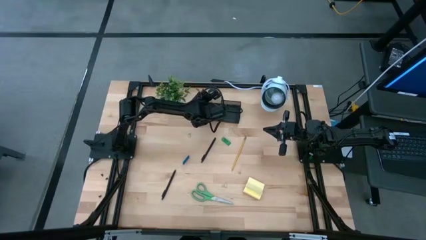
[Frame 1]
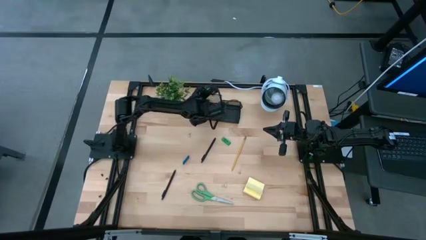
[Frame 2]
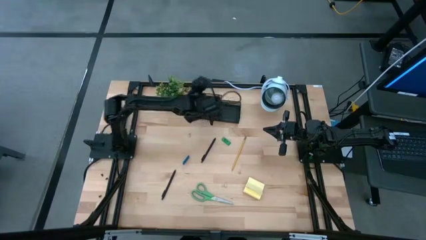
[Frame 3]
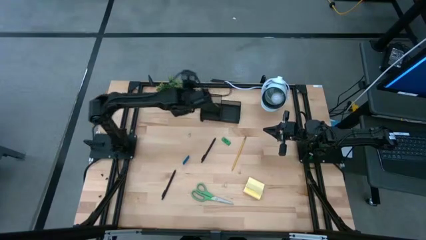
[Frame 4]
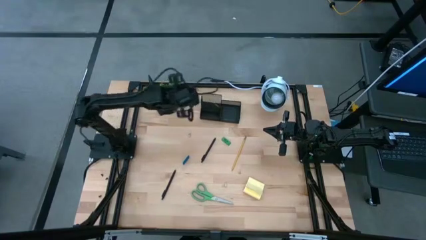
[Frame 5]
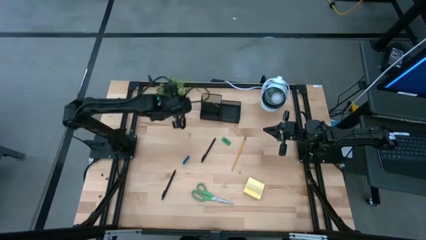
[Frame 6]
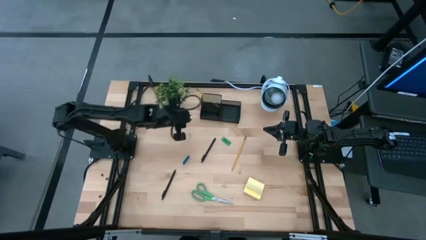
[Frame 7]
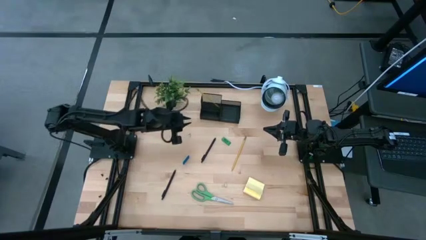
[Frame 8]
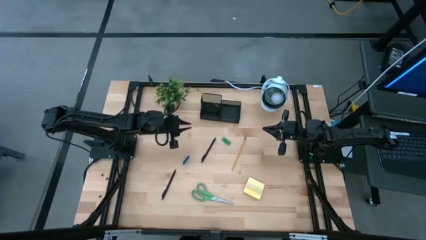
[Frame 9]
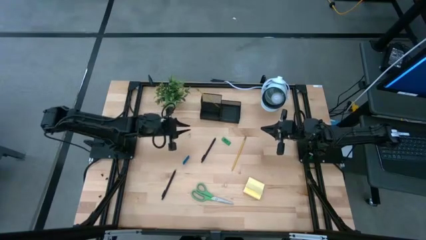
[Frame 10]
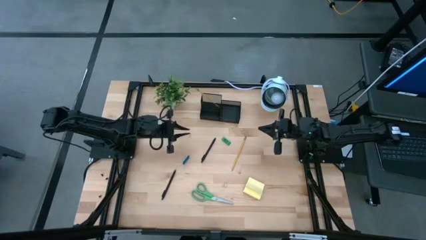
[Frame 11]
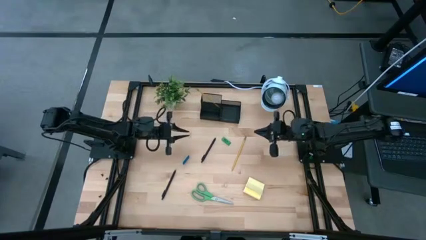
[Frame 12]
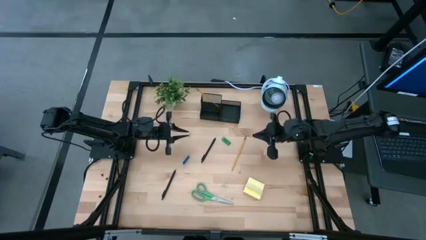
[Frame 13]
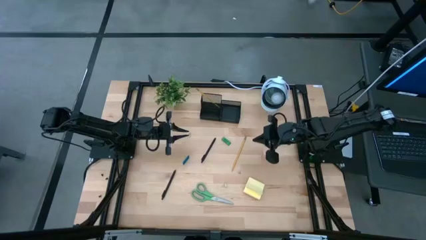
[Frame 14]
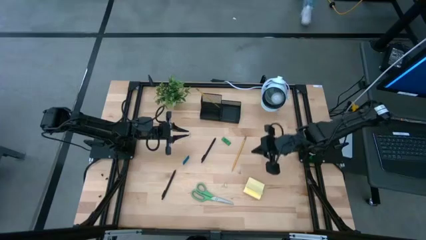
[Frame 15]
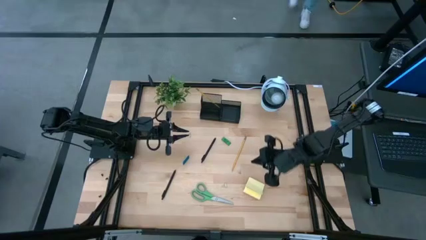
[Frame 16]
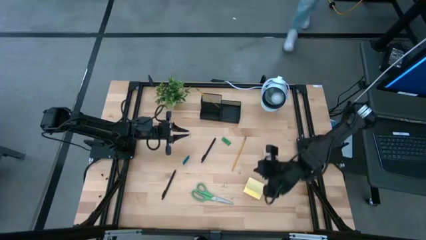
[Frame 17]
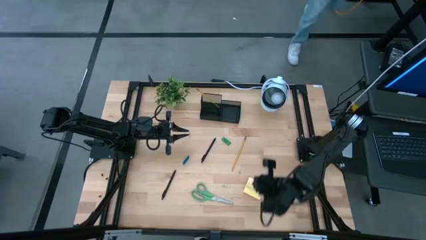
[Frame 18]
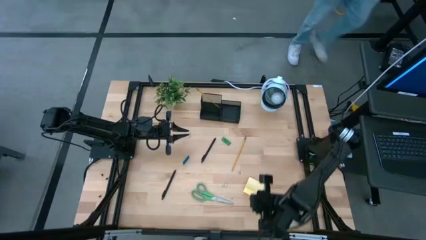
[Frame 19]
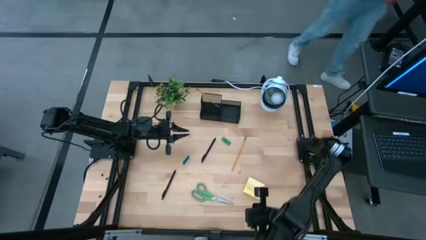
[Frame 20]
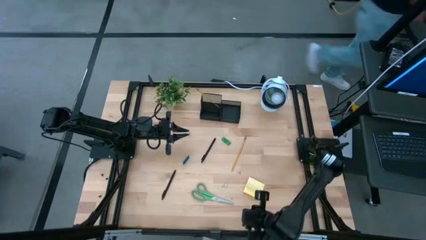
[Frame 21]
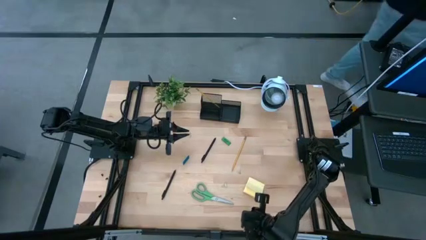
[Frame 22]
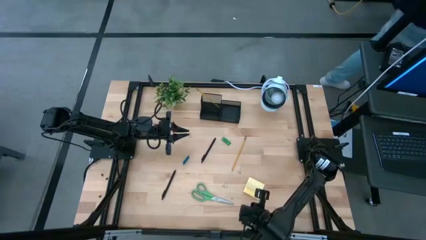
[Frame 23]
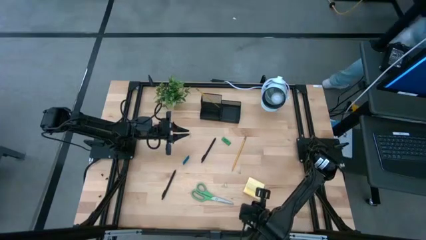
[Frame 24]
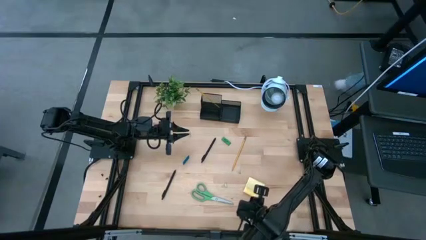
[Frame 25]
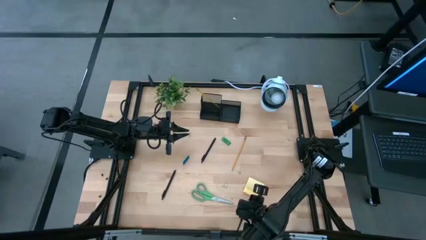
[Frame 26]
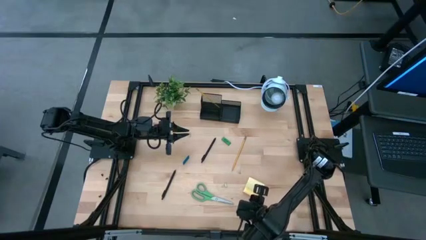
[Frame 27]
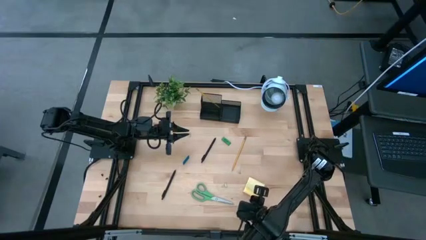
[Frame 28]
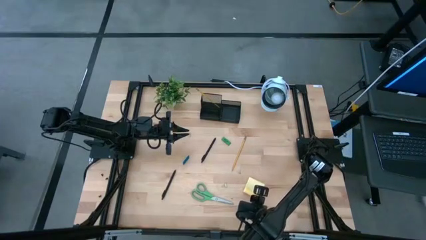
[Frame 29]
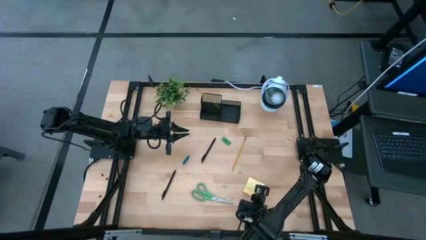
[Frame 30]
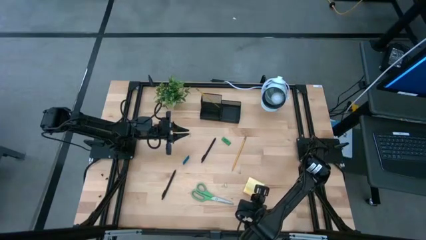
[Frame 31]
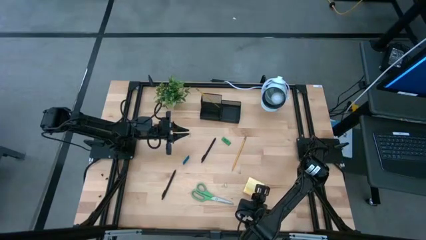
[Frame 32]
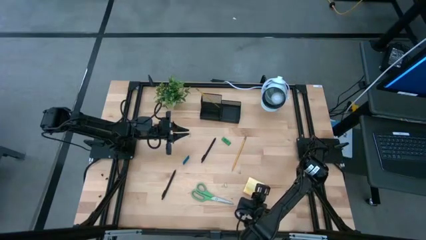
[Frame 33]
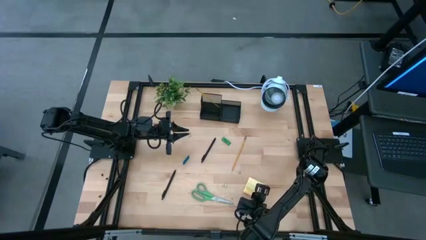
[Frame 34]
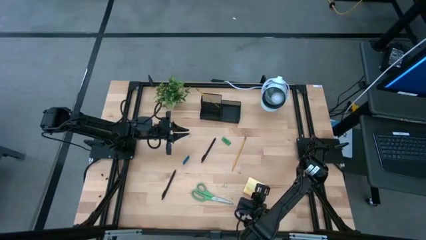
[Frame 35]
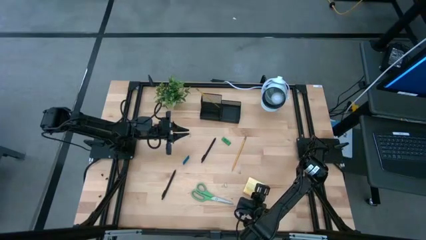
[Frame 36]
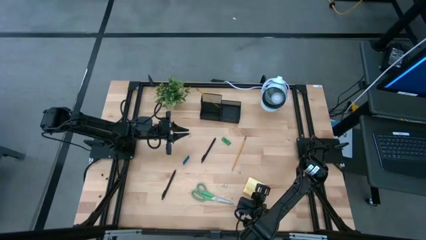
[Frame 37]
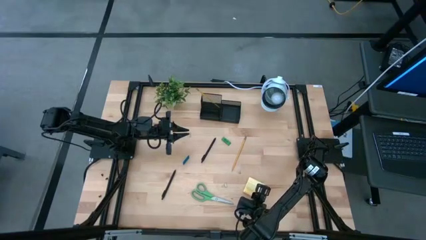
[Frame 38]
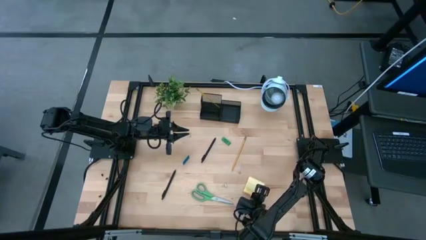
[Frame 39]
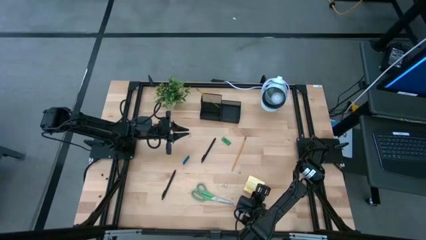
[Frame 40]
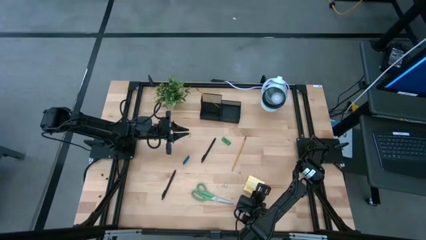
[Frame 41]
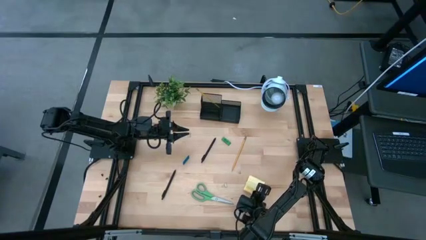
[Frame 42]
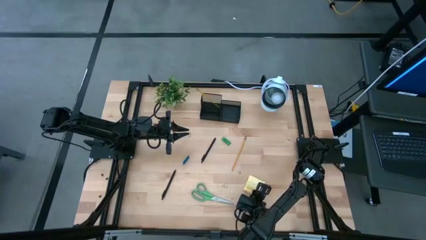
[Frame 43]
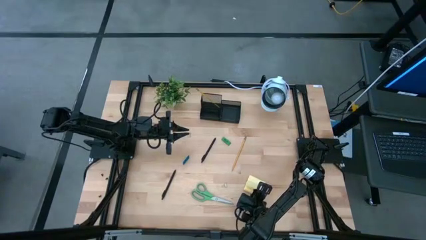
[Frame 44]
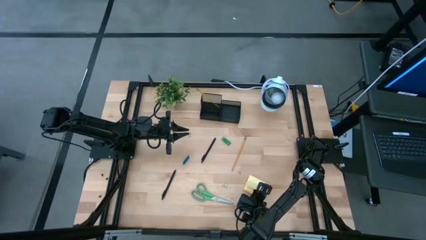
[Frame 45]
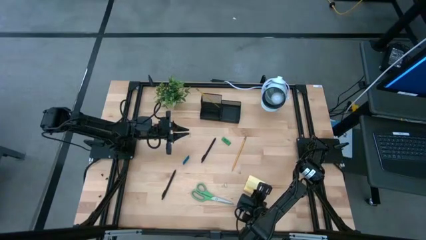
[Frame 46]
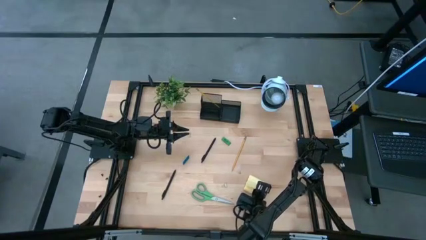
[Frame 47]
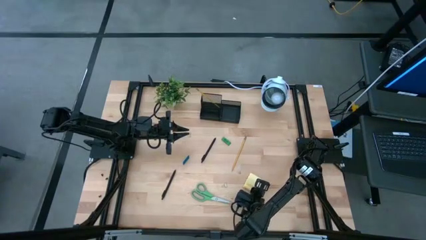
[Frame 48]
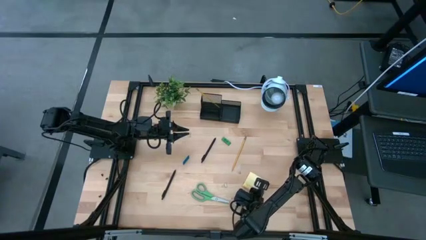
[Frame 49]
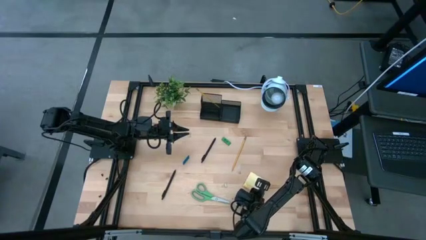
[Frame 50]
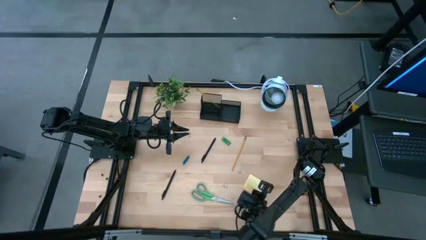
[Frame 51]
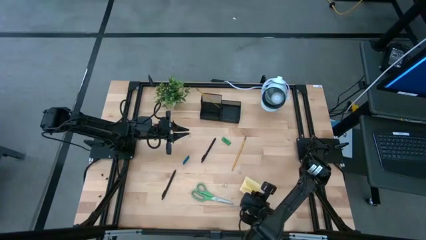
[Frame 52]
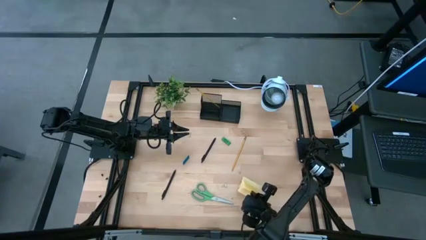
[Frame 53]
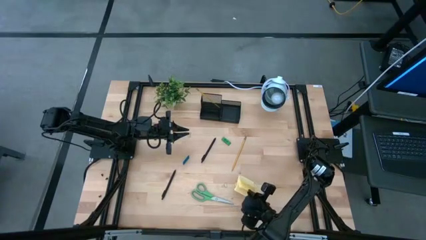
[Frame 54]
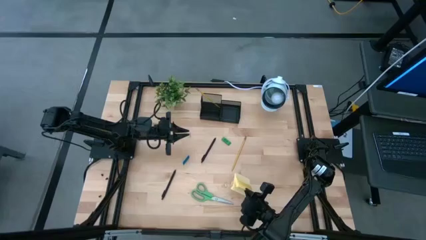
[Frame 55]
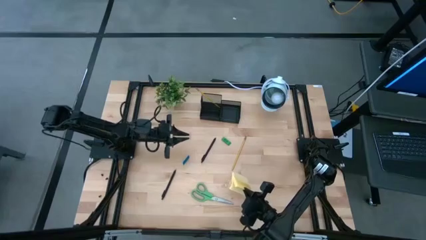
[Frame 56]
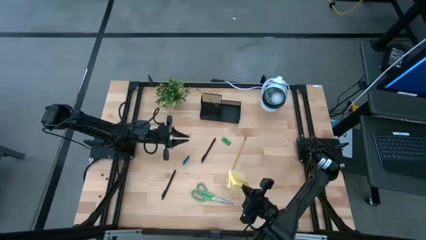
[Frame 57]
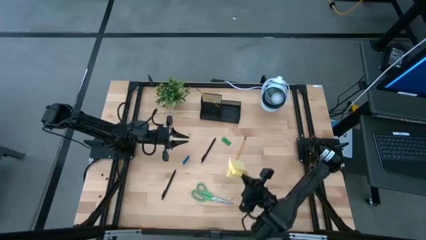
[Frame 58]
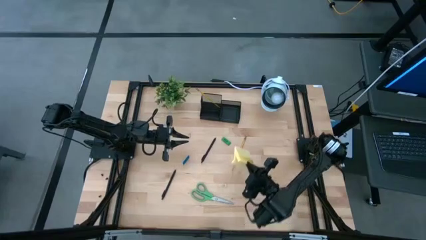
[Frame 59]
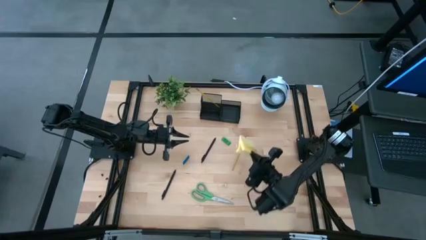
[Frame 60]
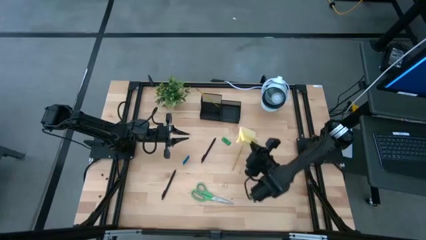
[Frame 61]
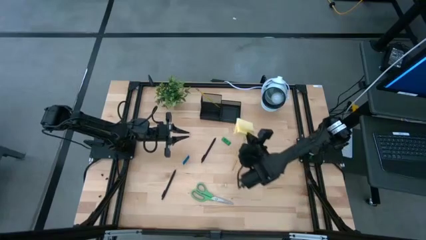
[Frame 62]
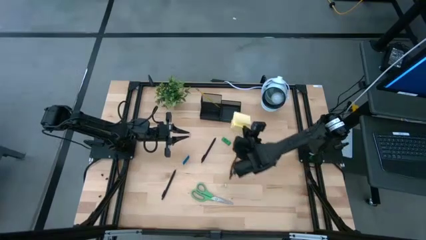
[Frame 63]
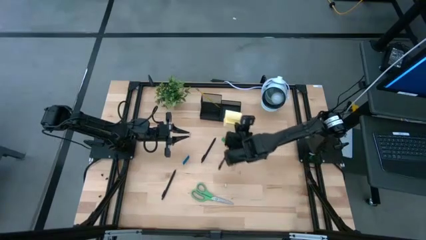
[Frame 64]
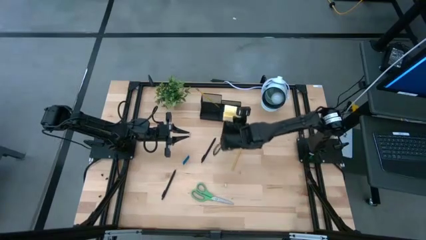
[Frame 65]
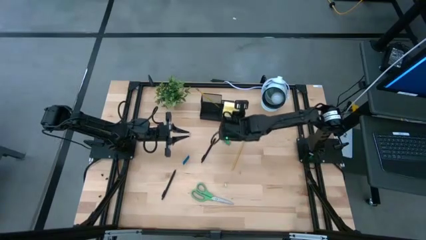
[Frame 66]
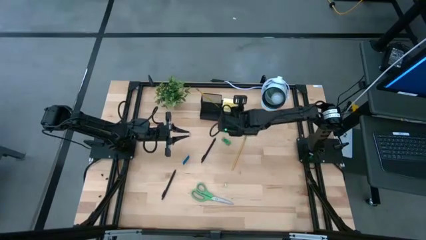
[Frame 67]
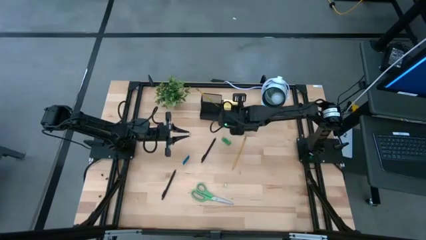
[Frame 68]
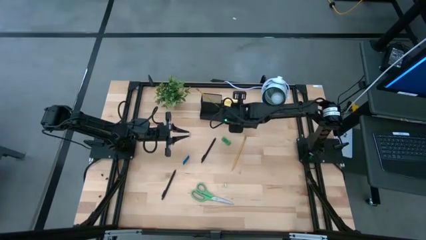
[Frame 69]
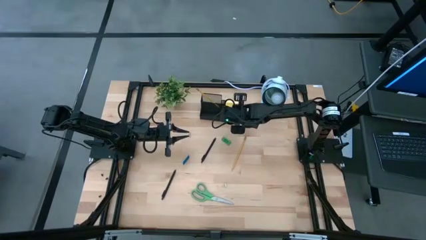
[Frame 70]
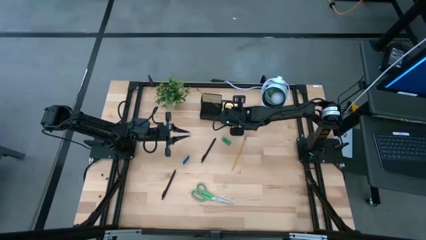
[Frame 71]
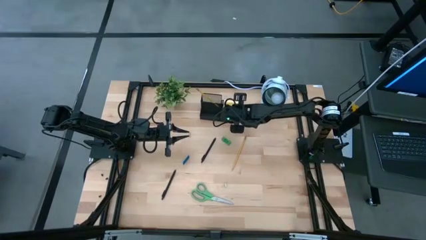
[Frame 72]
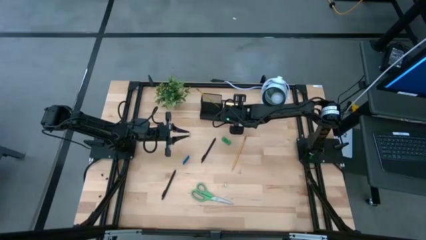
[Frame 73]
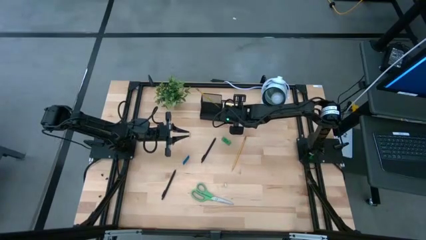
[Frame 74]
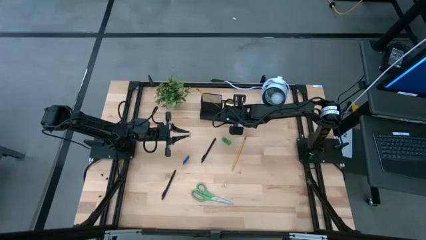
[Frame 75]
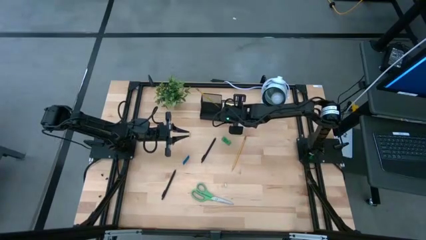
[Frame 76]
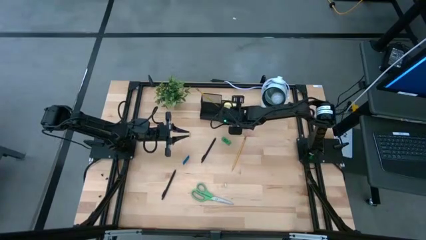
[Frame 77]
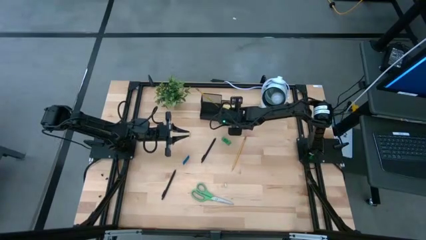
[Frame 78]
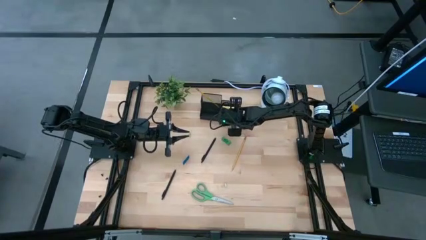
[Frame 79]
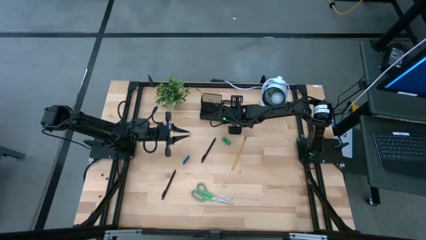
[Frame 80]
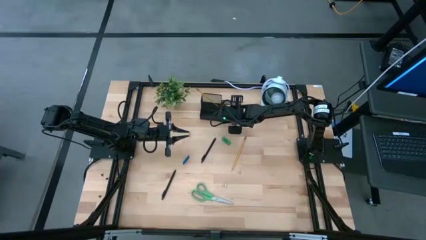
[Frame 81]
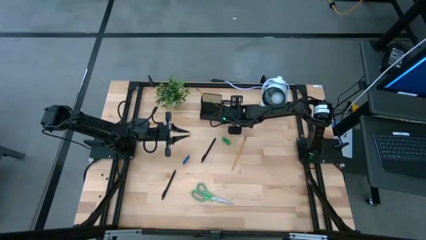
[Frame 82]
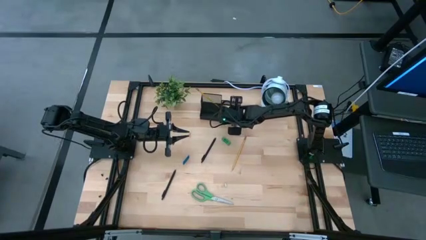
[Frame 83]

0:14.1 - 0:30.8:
Task: Pick and place office supplies into organizer
Put the yellow sticky notes into the black organizer
